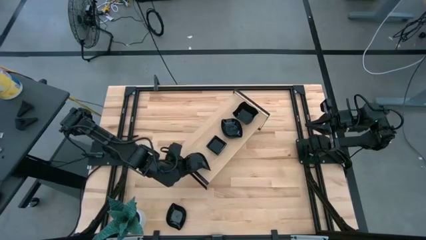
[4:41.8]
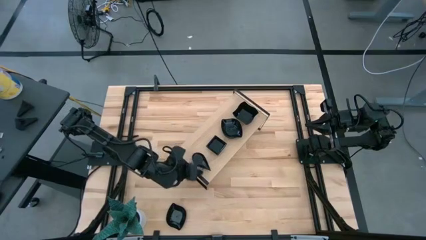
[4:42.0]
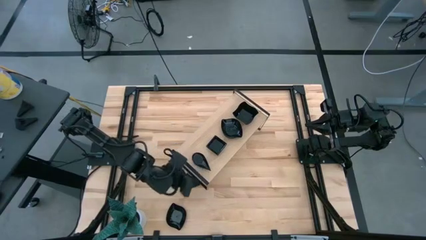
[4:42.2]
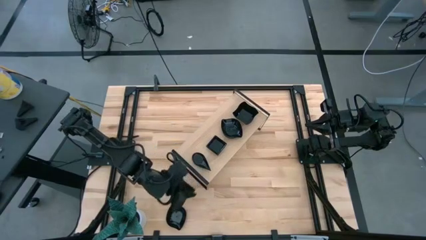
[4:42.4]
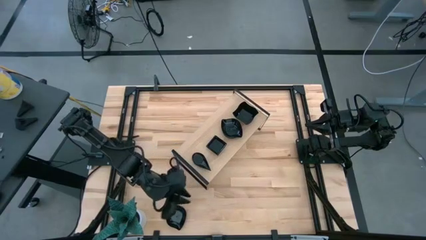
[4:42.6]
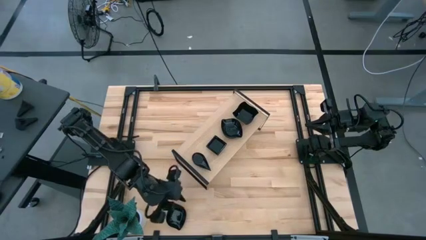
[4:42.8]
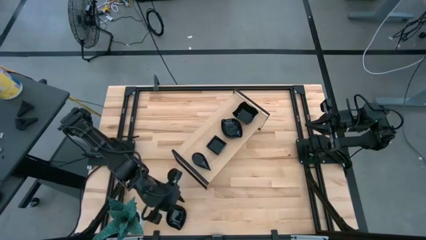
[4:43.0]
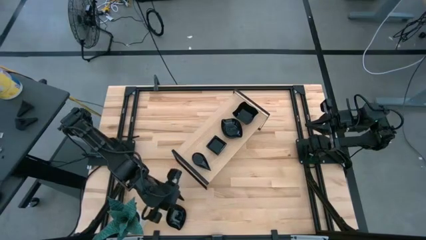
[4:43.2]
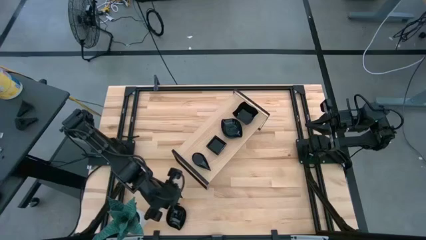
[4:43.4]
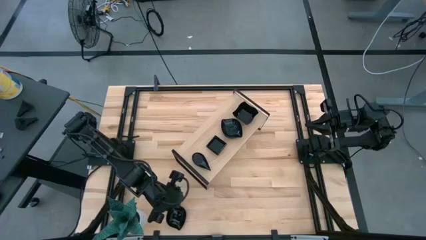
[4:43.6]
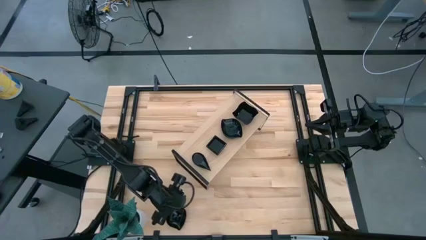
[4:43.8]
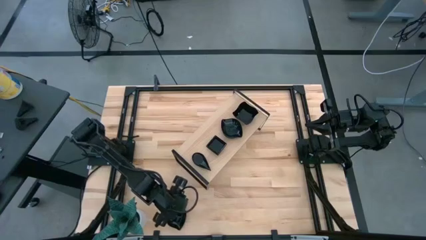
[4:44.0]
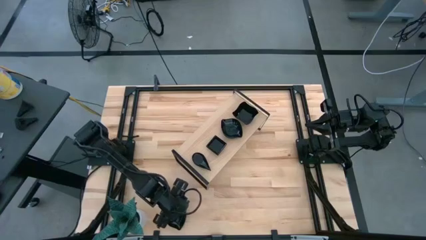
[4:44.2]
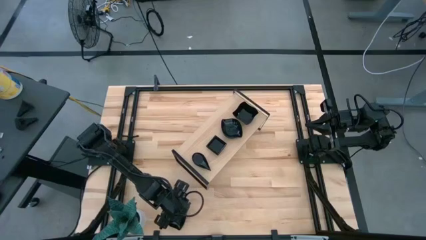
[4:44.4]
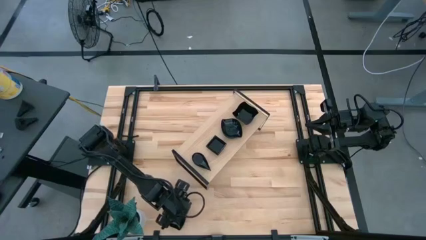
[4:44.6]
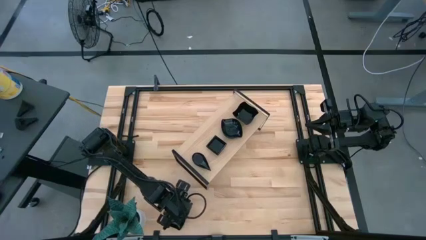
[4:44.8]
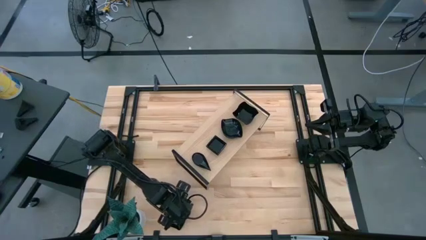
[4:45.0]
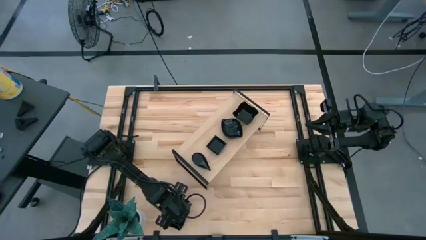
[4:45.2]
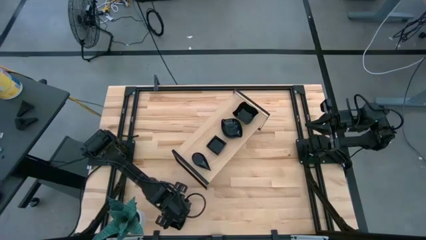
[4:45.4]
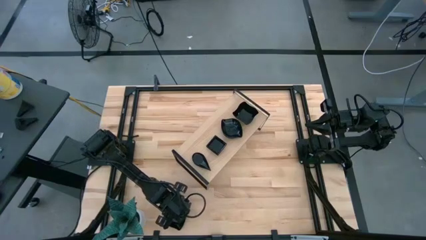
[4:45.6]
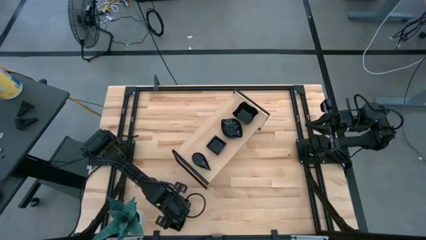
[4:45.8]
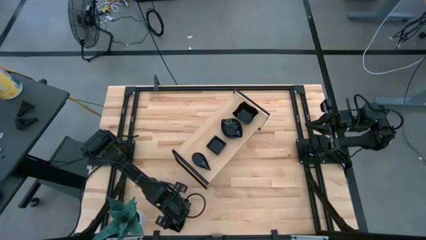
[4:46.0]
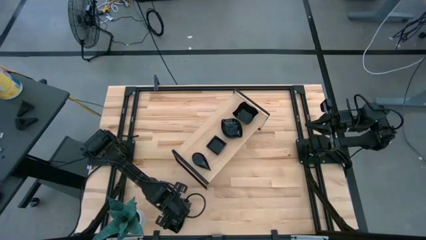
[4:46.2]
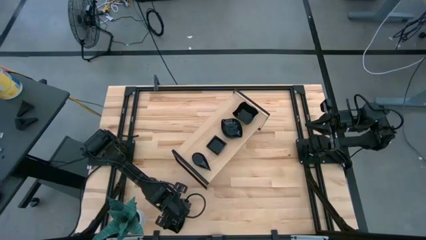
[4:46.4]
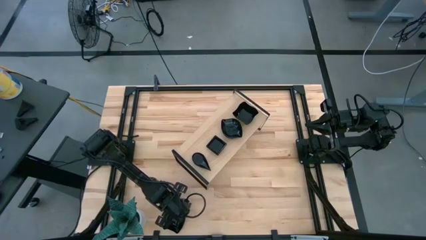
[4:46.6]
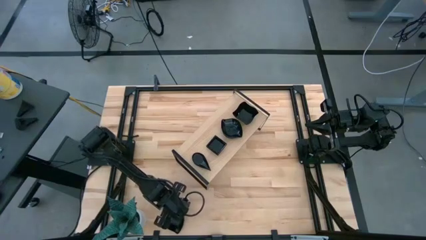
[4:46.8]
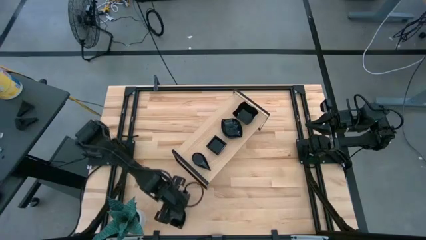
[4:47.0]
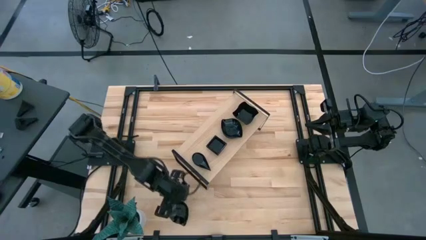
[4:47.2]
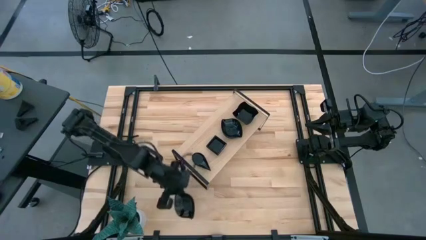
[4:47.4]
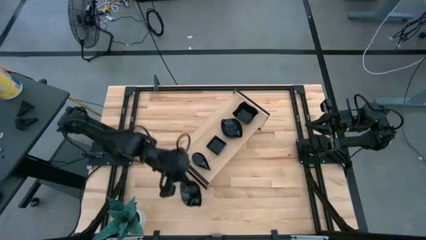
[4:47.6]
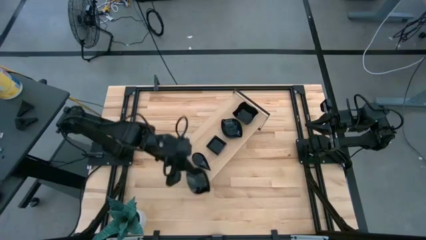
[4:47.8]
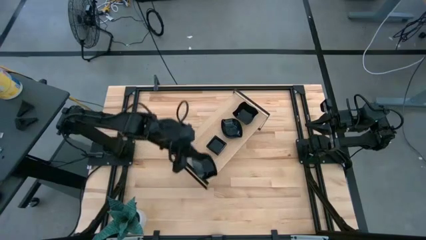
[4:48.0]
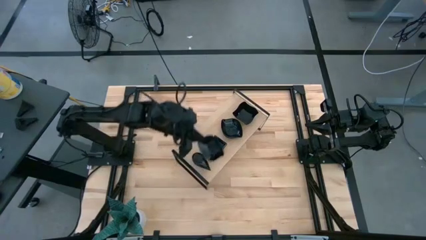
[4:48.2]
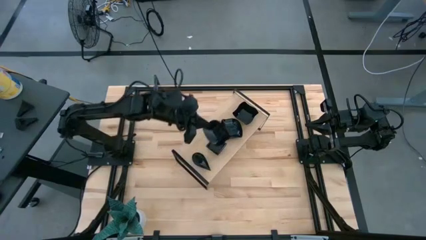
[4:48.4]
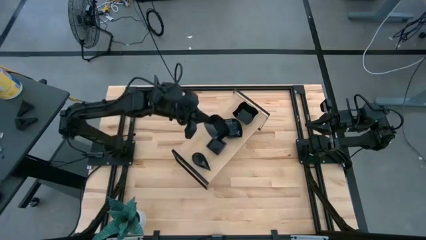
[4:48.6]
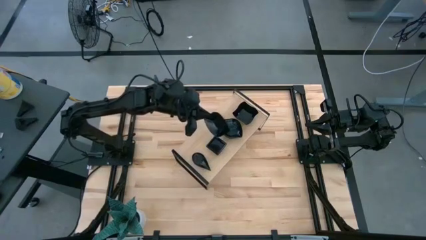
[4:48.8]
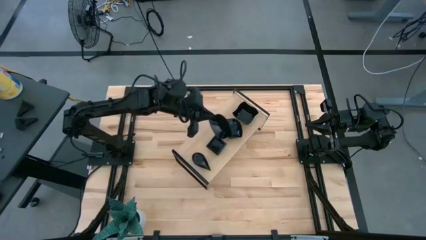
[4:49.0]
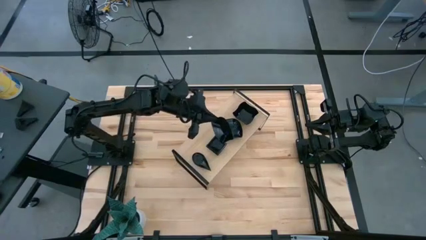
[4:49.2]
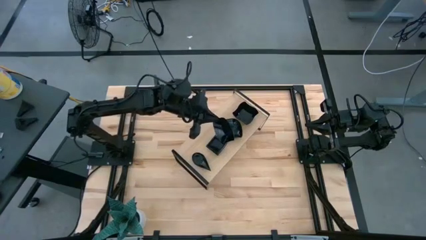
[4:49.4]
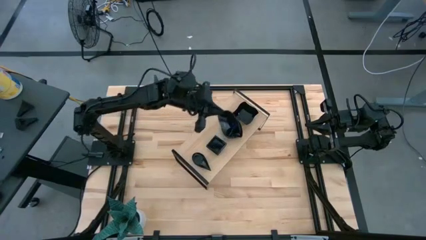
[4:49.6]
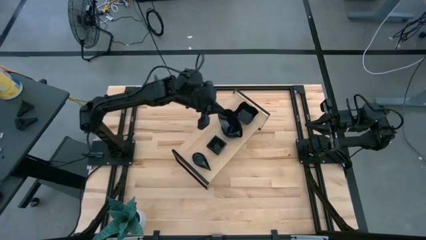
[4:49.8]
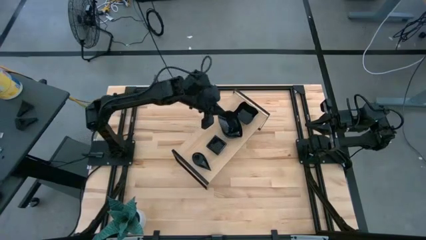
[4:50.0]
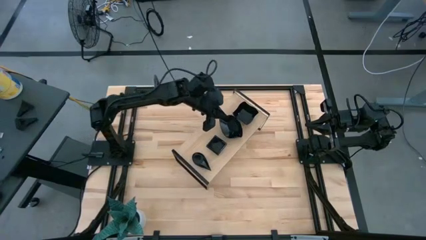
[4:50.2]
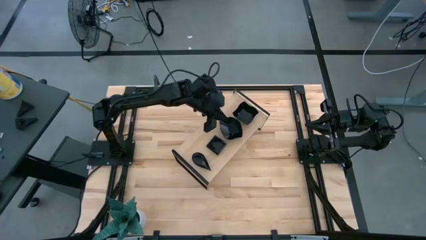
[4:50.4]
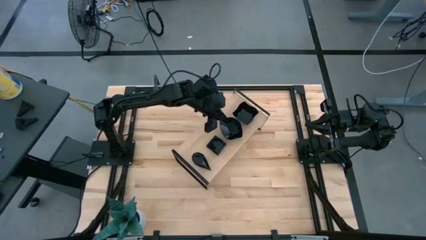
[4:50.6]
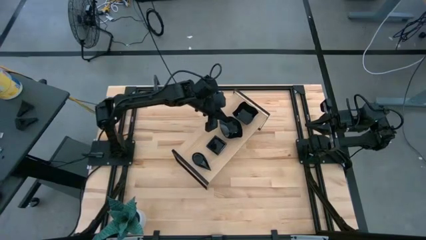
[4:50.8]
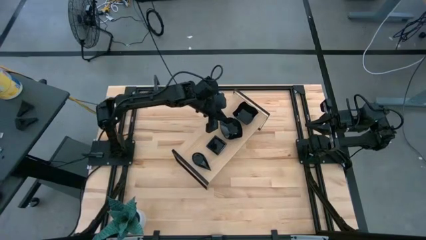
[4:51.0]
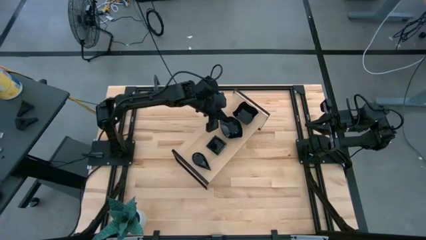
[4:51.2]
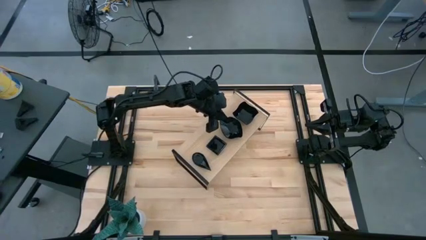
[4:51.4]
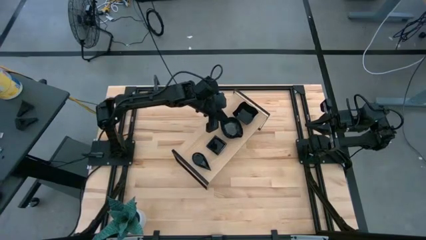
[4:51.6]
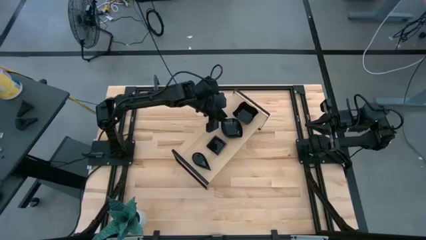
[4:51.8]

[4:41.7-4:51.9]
Task: Pick & Place Mini shaped plates
Stack the black leaf shaped bowl on top of the black leaf shaped bowl on the shelf

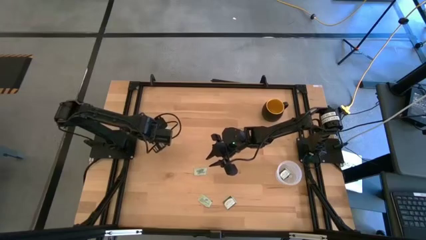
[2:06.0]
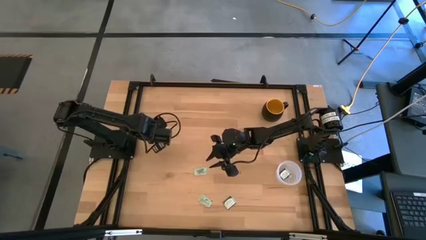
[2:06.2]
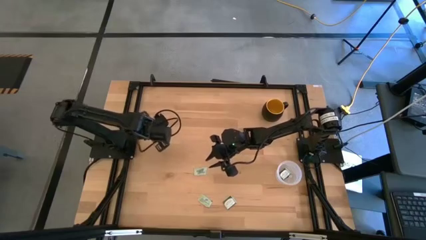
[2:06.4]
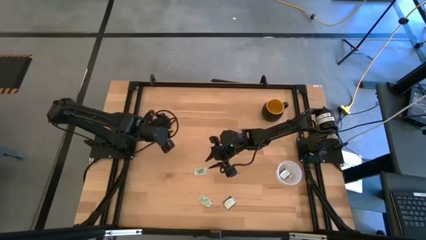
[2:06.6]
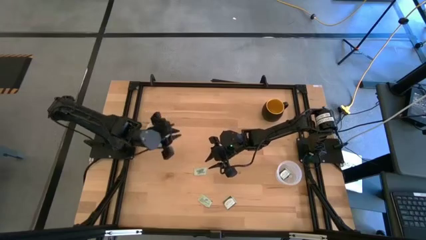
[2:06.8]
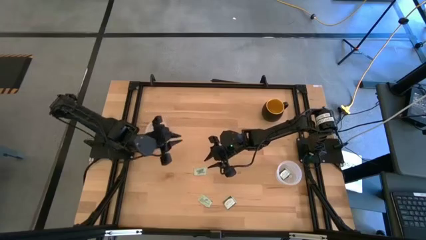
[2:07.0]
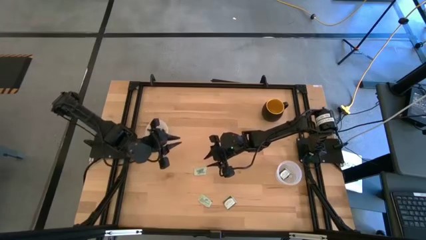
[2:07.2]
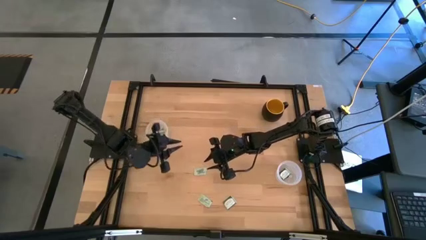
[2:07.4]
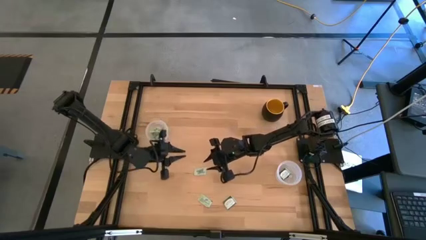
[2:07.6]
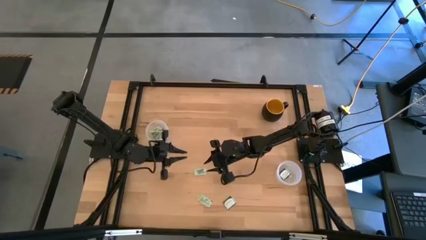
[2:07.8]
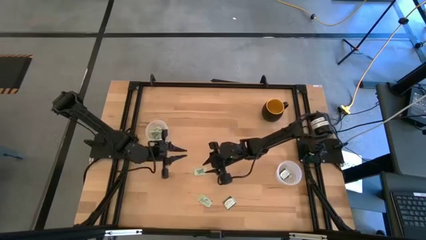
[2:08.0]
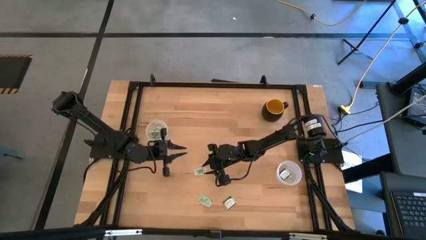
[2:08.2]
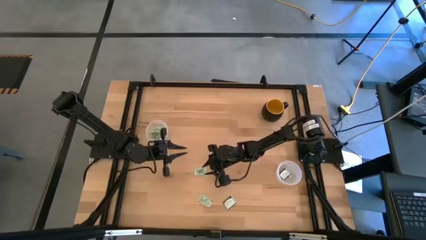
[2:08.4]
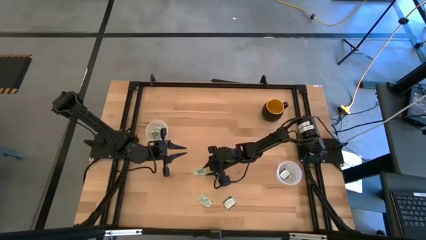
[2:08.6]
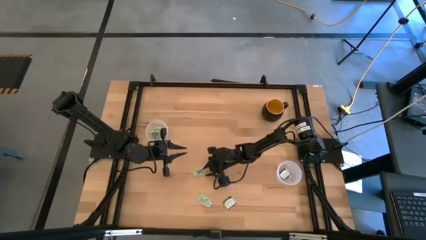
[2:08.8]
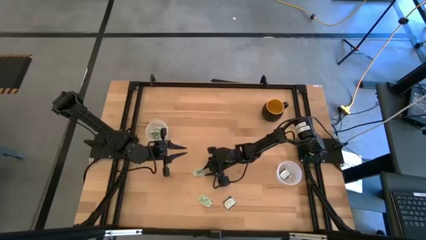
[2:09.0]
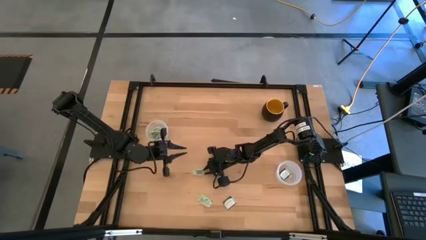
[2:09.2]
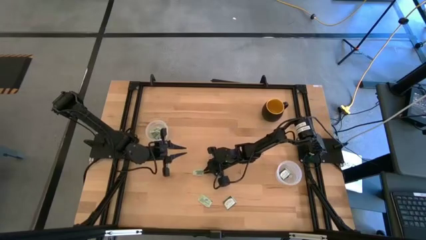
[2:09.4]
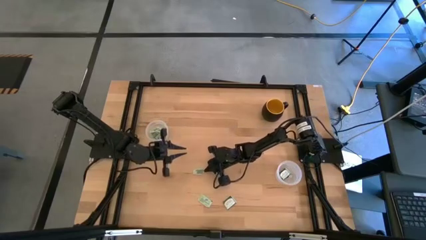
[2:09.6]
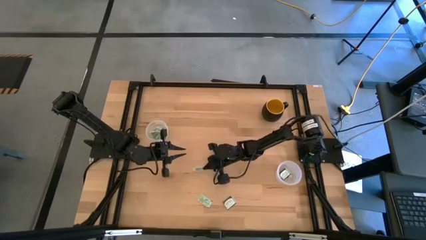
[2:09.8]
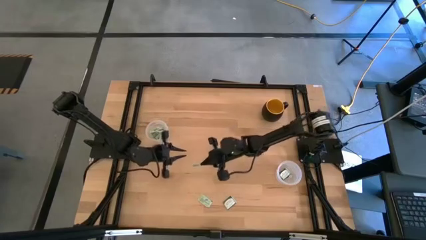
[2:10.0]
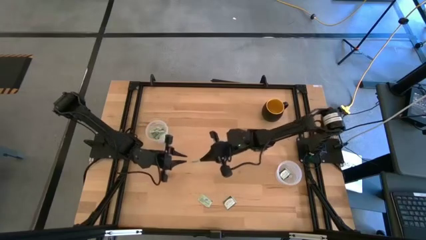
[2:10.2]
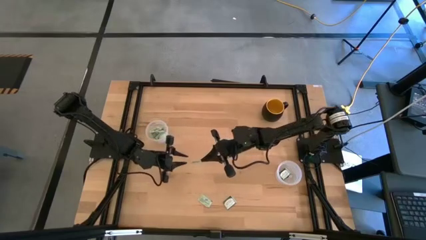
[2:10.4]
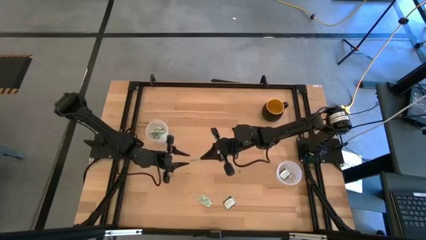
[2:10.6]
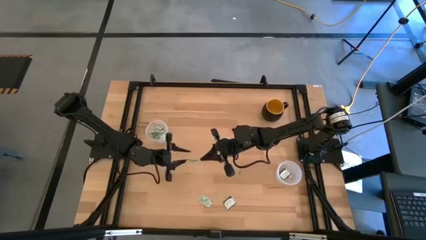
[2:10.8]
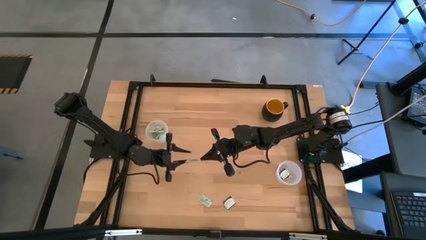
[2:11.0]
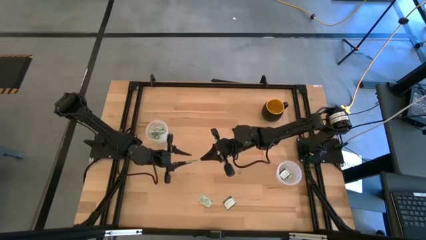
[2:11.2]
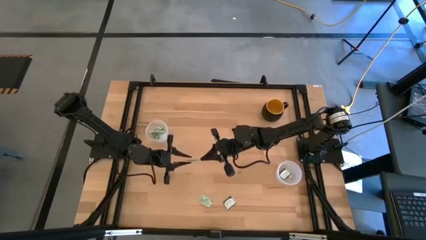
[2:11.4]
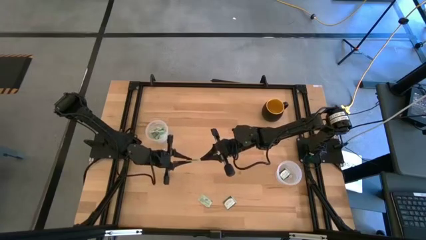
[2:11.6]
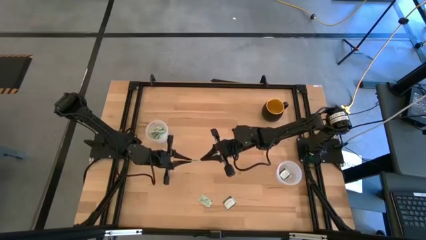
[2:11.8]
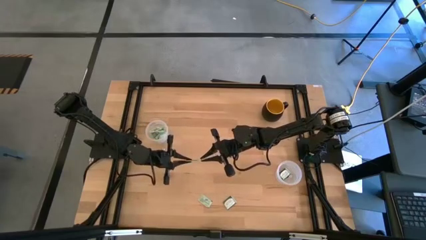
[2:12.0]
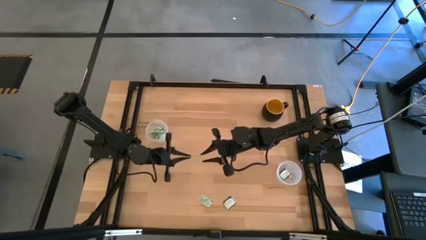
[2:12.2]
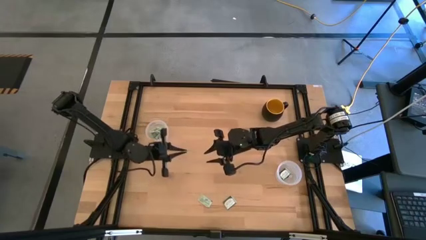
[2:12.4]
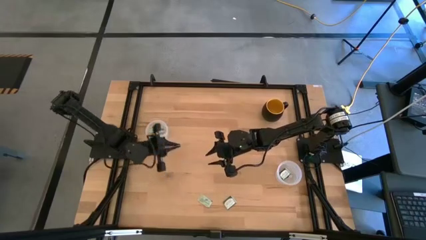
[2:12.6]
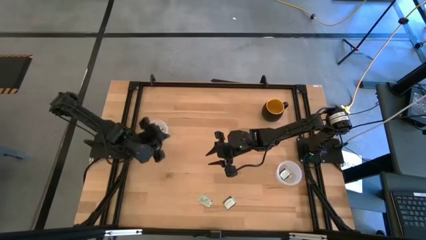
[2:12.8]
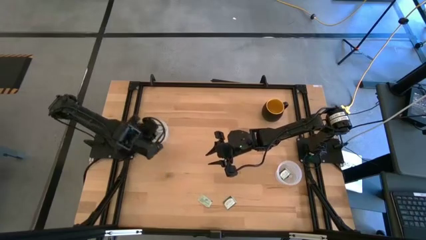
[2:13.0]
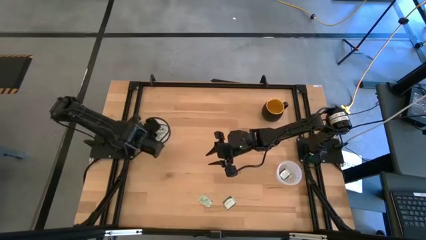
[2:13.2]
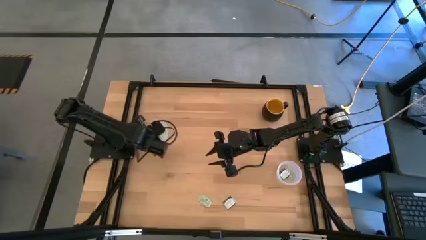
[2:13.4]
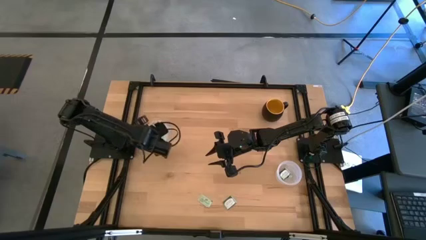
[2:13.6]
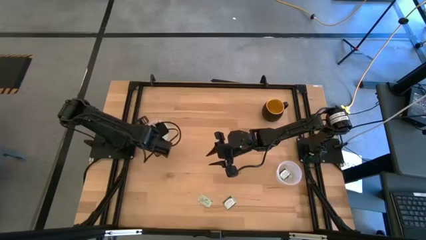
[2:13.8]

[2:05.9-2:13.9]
Task: Pick and place Stevia / Truvia into bins
Put the white stevia packet into the left transparent container
